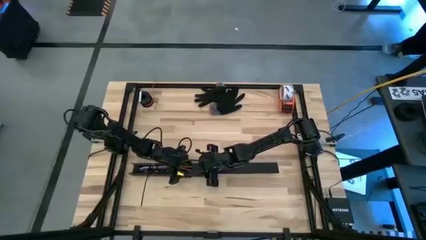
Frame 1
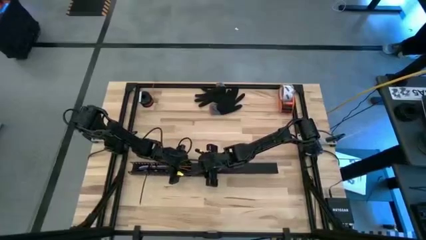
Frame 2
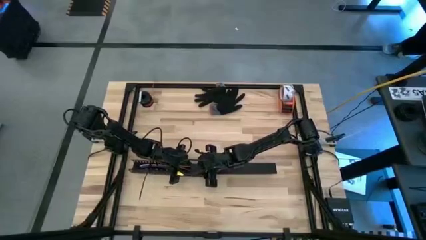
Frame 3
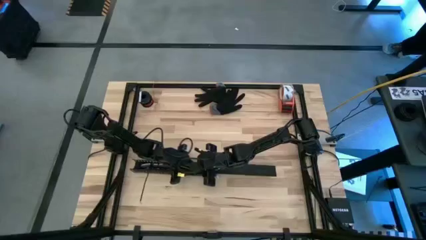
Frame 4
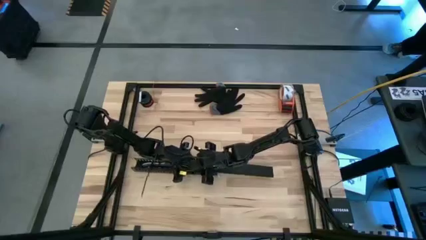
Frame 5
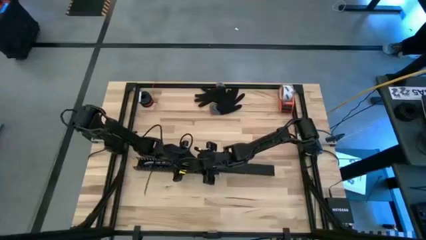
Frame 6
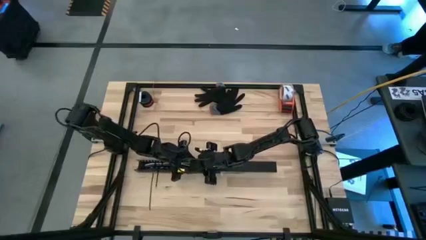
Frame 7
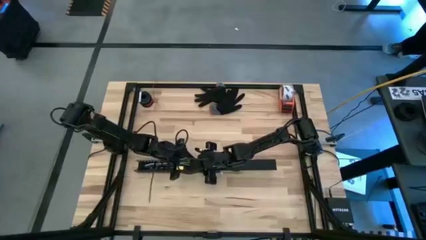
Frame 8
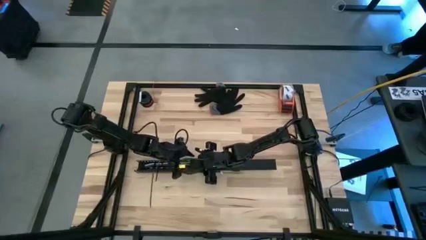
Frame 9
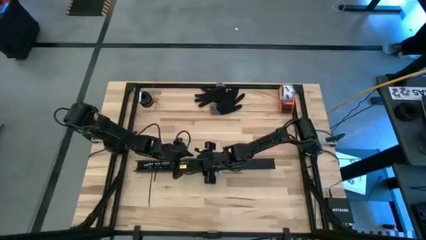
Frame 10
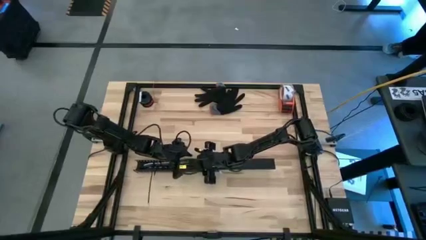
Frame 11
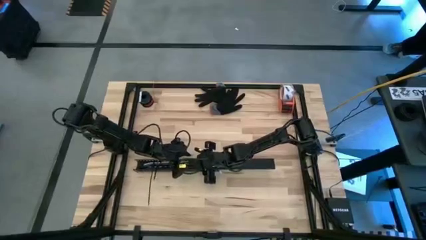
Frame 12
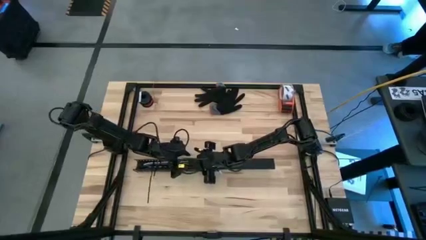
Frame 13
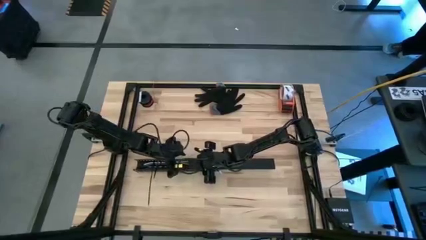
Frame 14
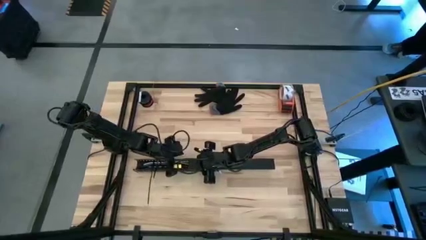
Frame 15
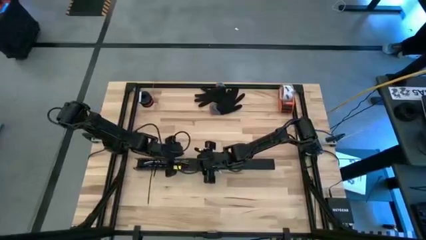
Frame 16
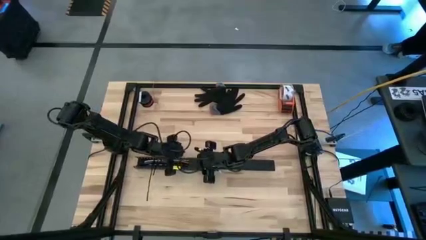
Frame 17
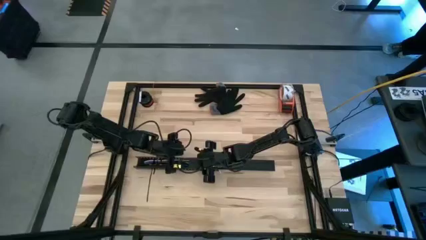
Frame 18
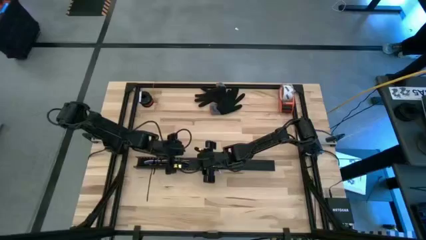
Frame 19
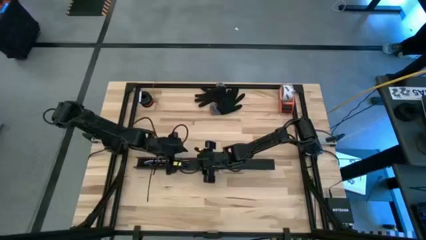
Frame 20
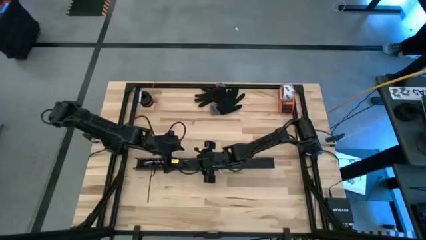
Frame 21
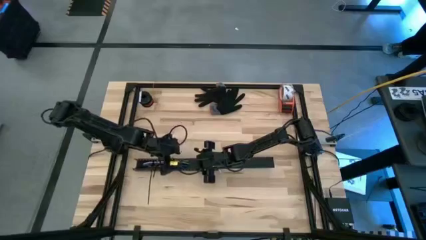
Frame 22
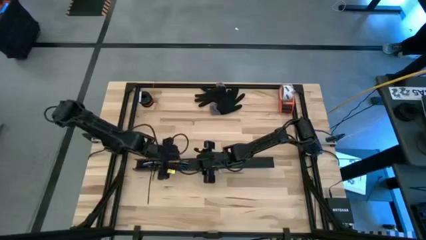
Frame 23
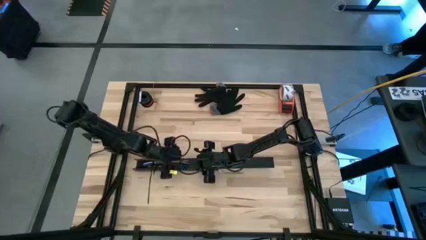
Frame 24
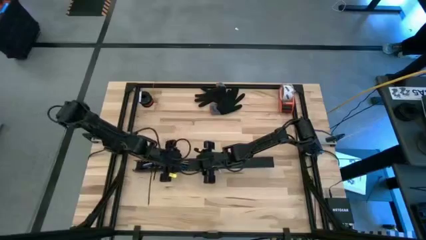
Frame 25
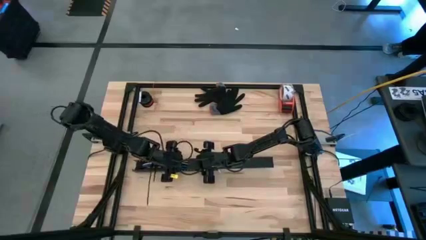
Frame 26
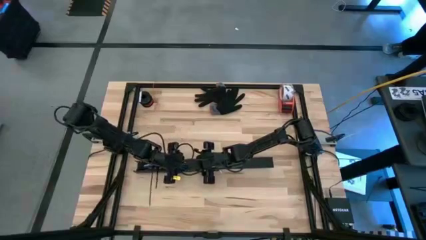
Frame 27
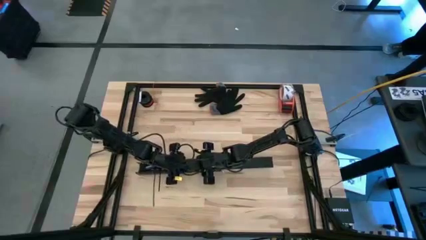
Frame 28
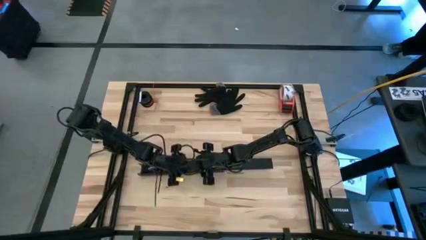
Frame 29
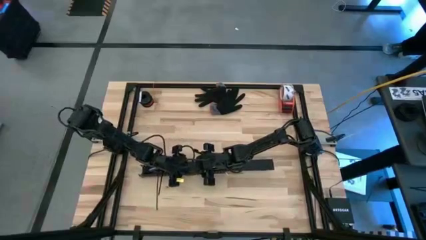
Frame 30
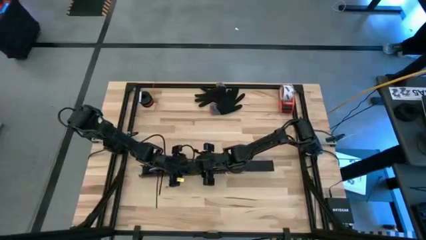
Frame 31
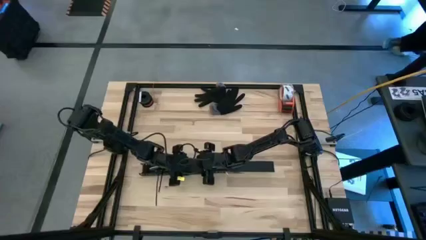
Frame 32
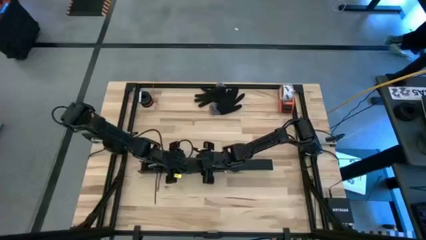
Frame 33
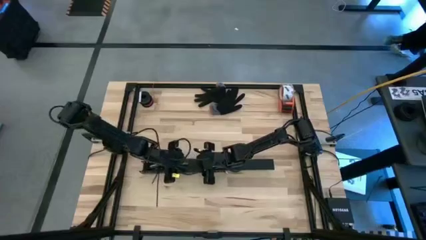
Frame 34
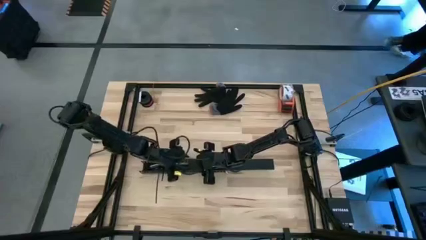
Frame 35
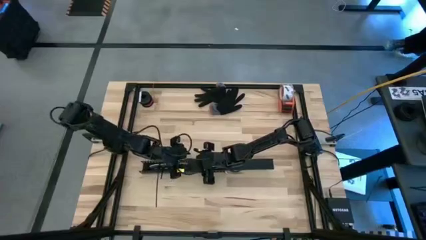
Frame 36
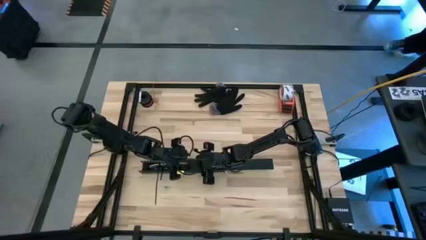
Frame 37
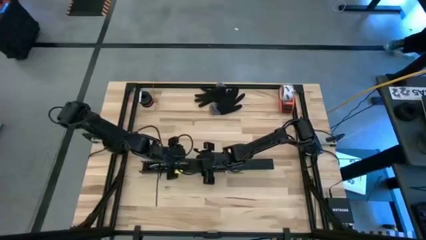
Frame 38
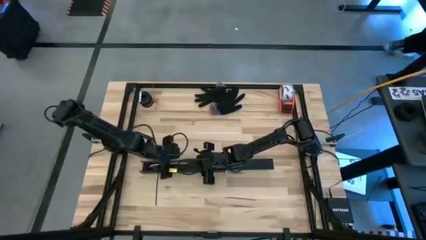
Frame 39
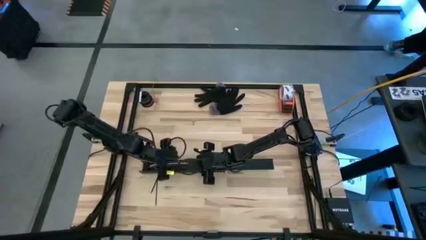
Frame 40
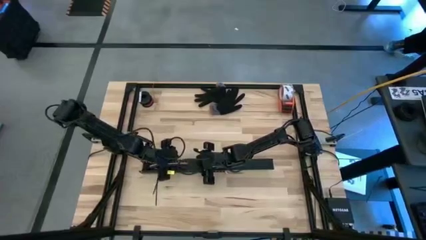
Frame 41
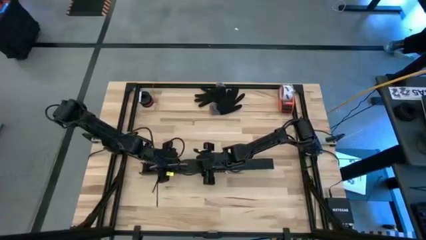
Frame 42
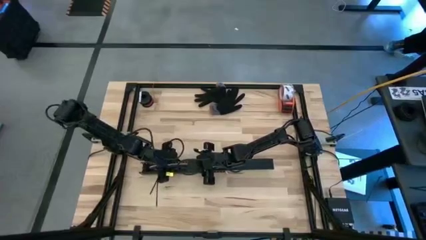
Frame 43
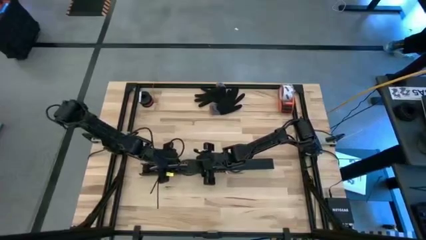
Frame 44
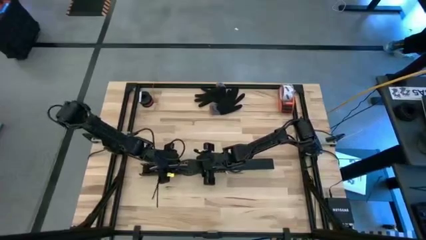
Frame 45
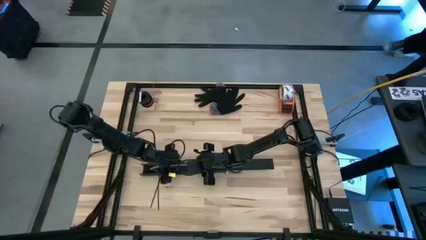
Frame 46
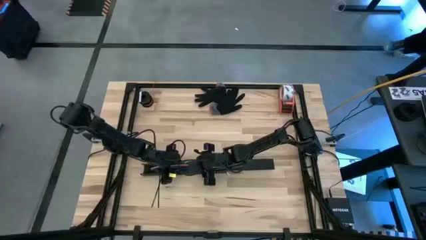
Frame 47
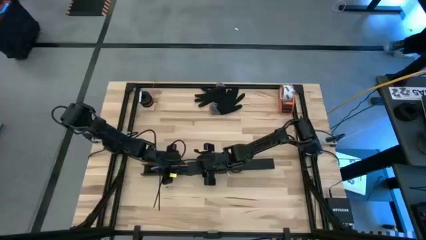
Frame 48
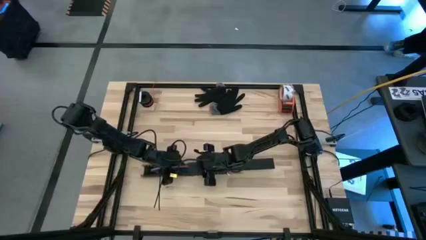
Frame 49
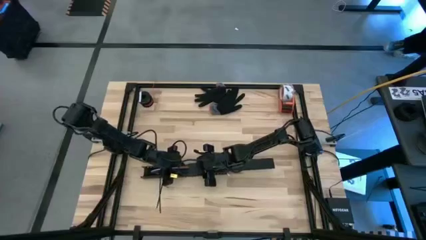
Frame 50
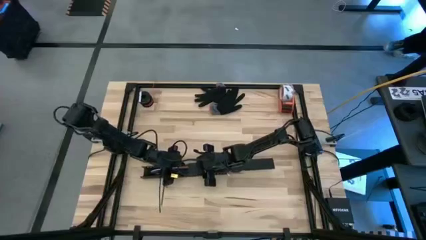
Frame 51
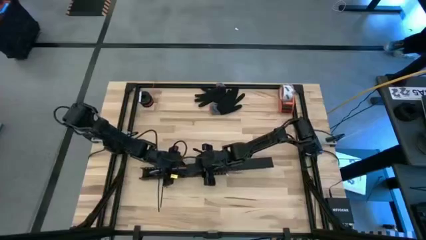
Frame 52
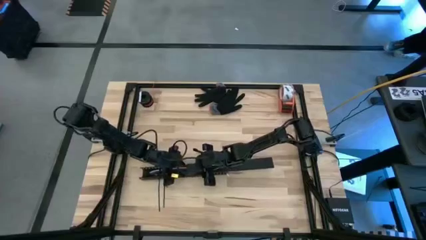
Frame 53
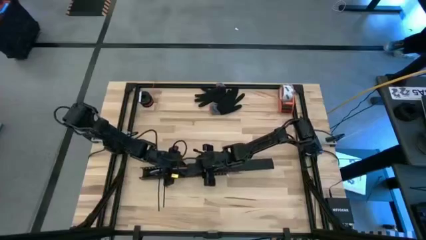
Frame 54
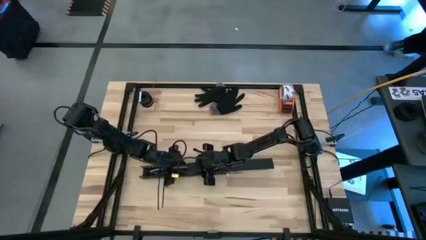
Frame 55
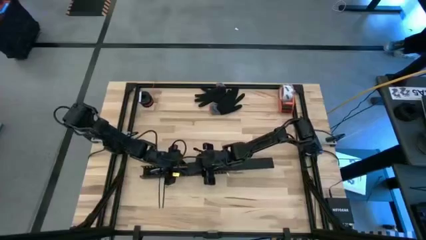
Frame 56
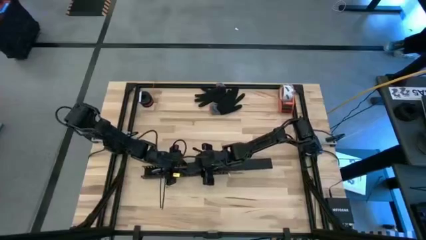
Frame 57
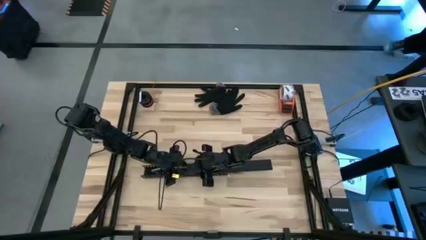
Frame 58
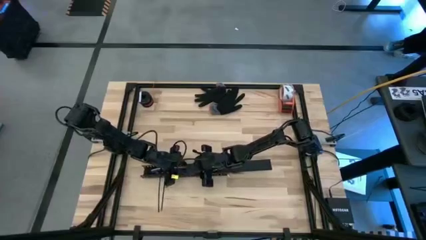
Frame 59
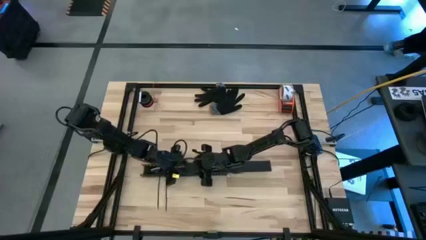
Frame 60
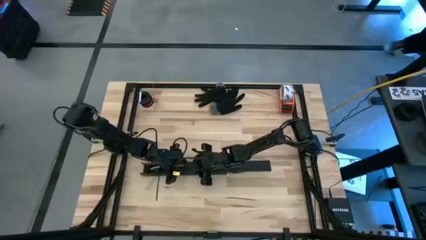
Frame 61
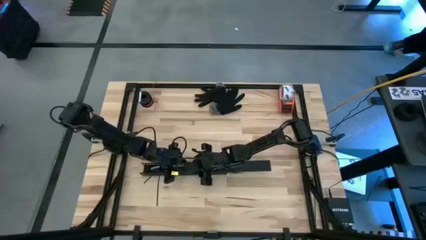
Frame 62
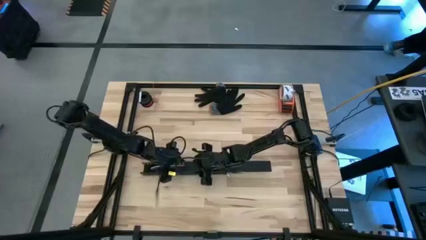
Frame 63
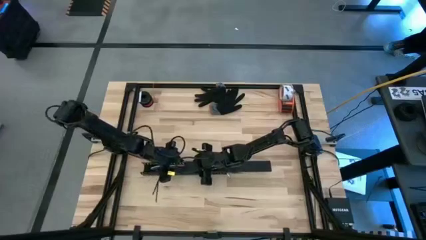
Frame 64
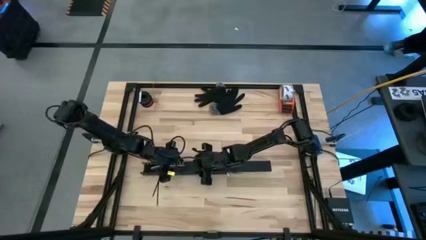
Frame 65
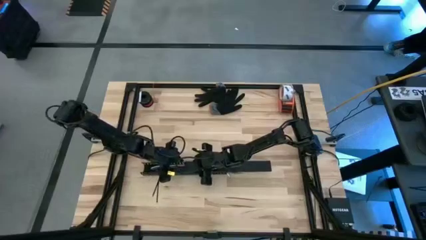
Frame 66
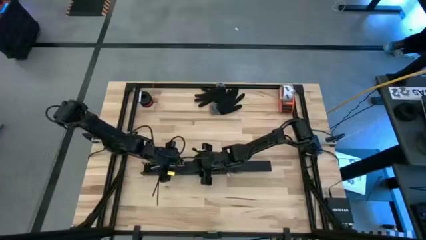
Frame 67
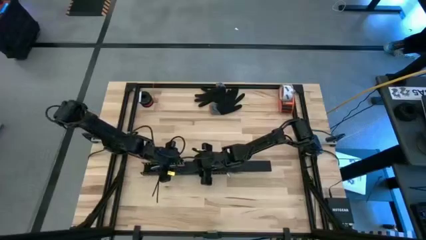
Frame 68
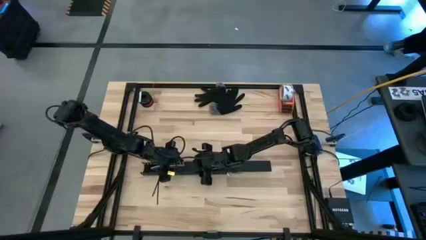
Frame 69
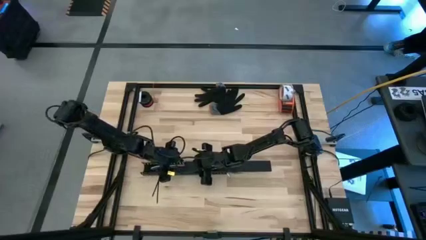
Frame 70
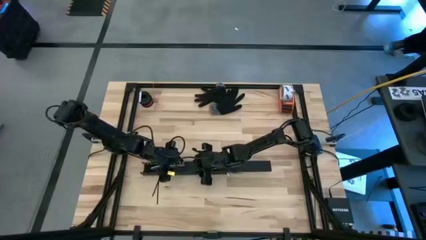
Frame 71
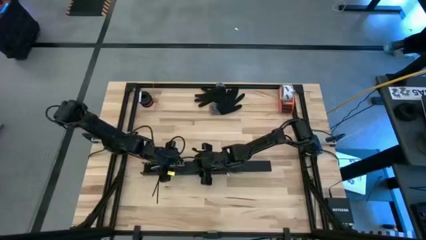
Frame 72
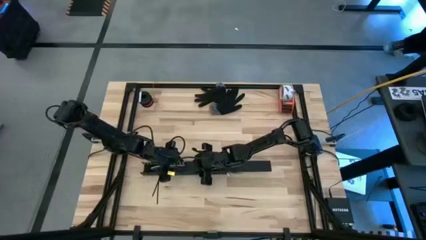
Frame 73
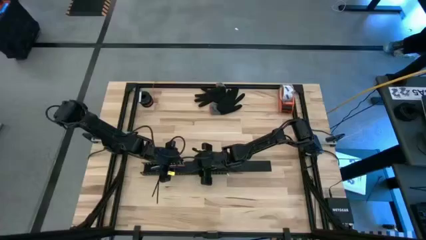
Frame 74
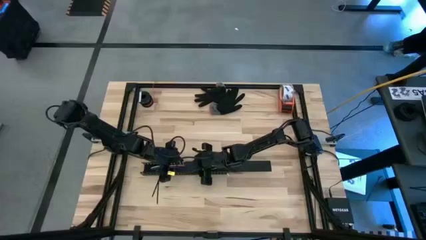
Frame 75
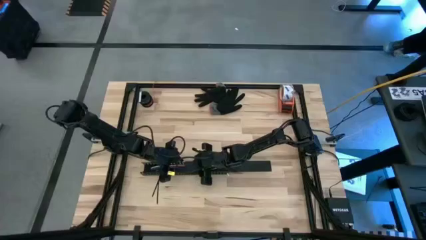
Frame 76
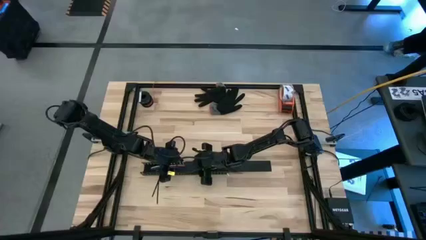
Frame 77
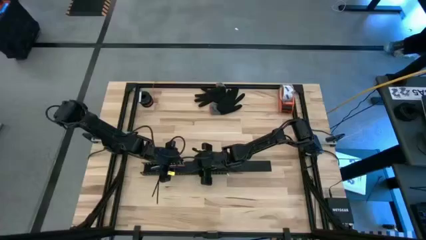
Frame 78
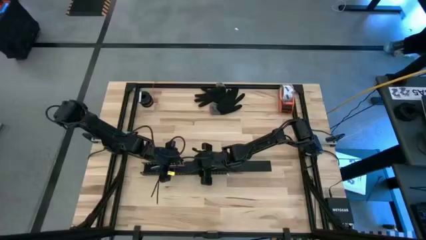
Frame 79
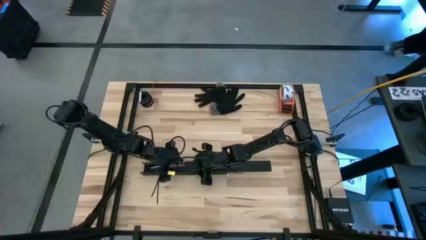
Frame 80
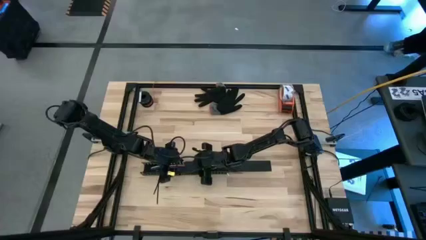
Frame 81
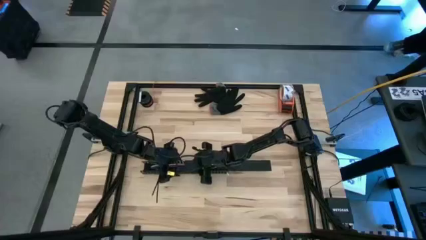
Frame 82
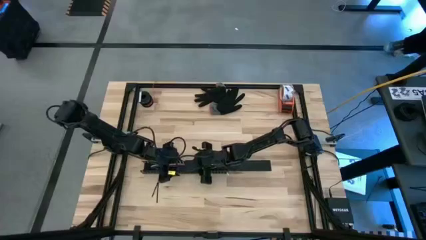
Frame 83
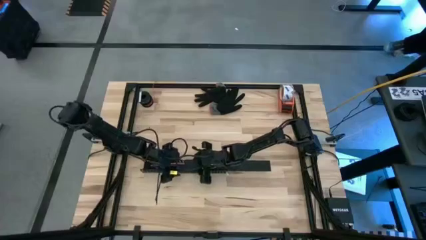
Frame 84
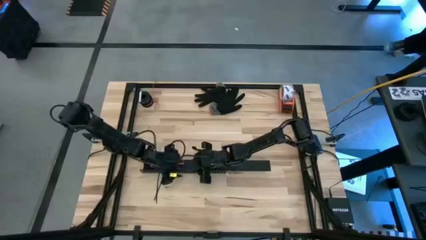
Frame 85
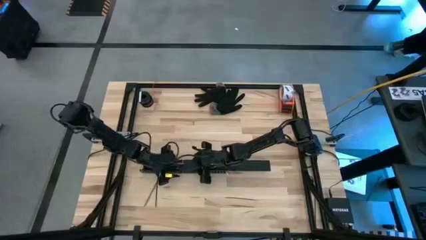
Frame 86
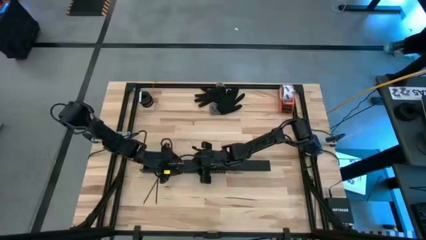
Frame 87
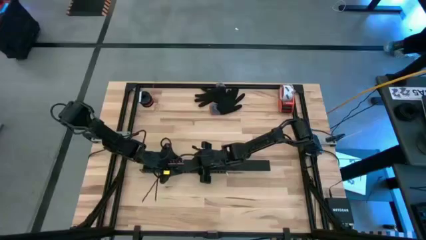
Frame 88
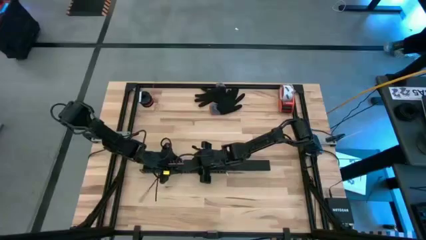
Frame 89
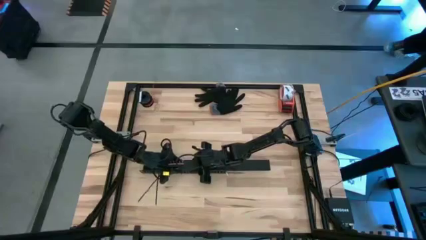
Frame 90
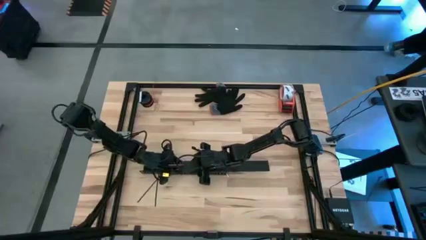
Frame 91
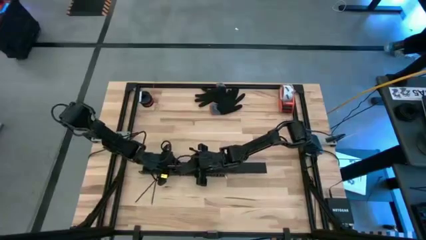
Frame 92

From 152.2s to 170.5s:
Task: Ziptie cables
Close the cable duct
